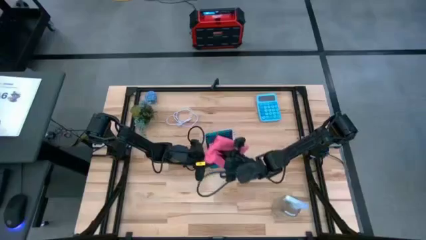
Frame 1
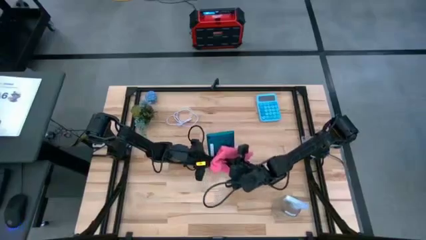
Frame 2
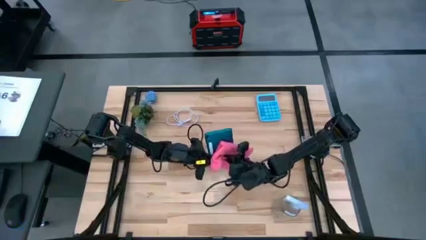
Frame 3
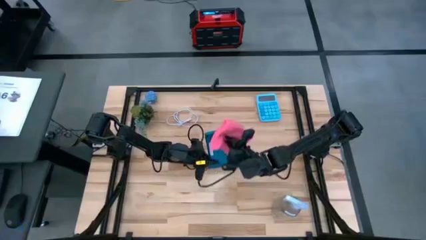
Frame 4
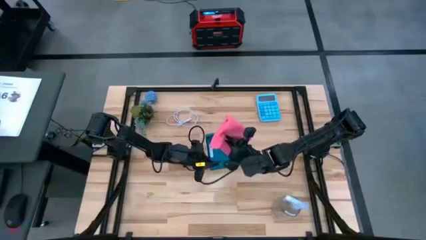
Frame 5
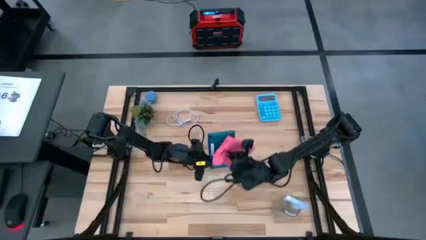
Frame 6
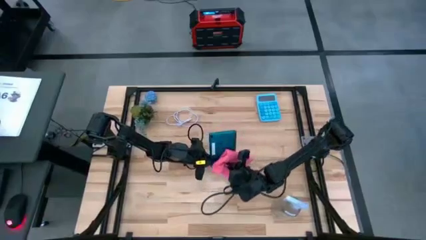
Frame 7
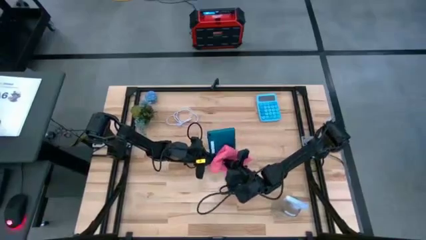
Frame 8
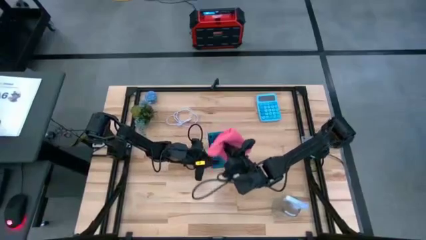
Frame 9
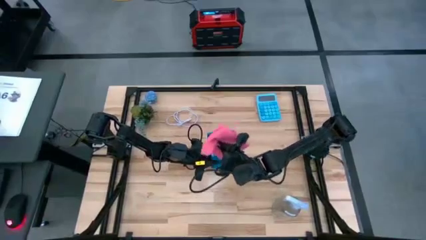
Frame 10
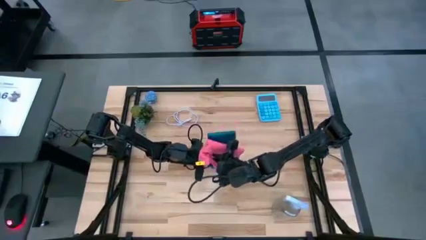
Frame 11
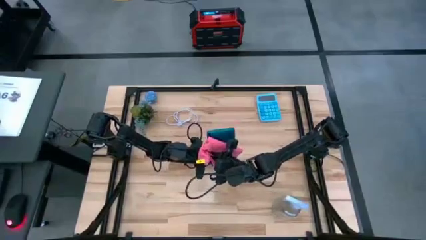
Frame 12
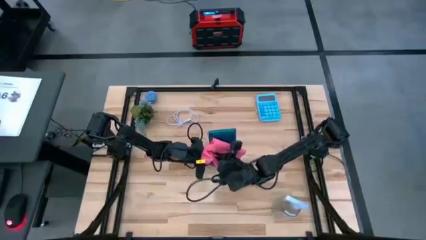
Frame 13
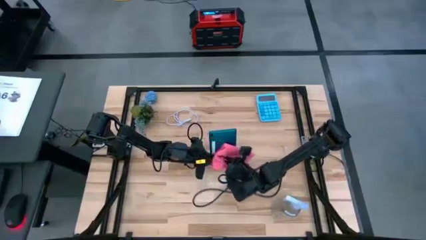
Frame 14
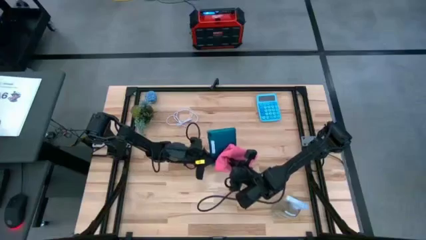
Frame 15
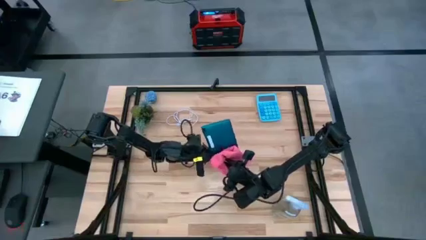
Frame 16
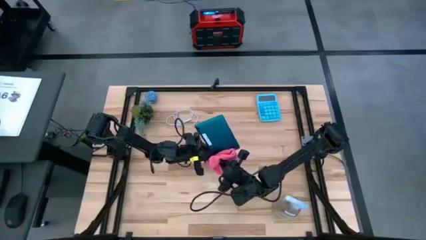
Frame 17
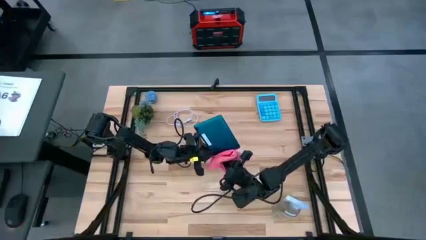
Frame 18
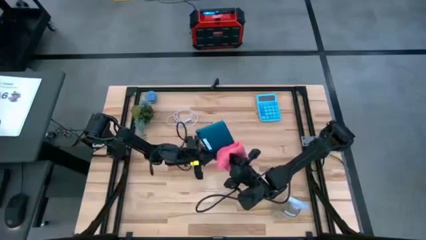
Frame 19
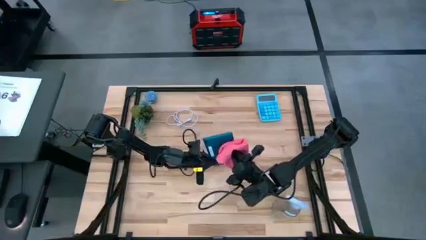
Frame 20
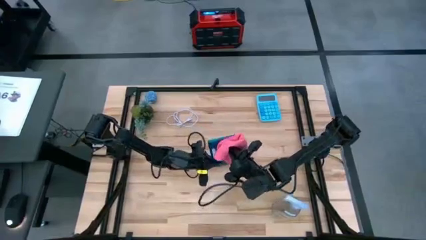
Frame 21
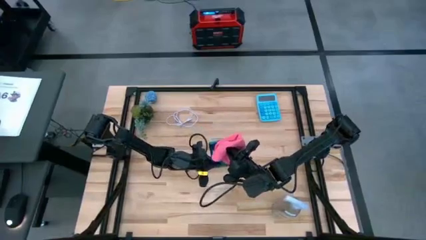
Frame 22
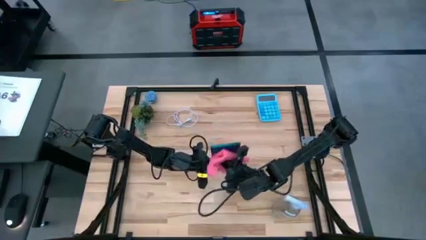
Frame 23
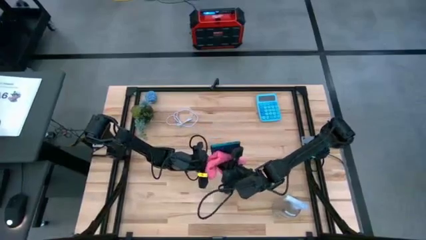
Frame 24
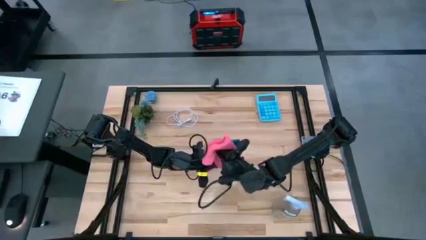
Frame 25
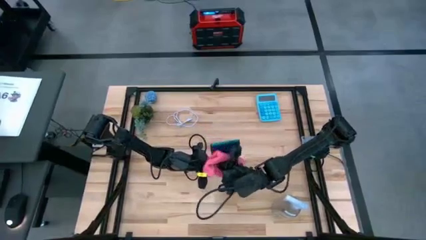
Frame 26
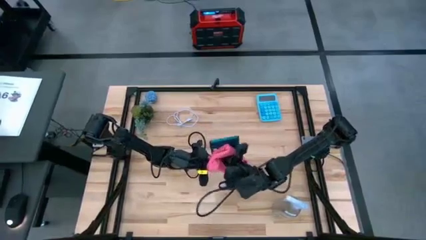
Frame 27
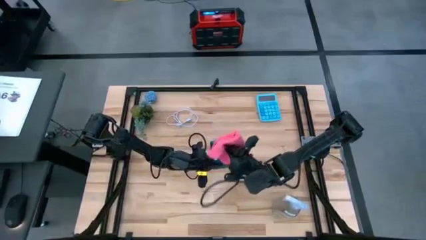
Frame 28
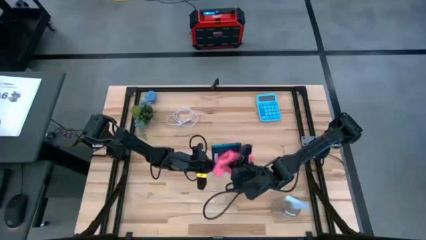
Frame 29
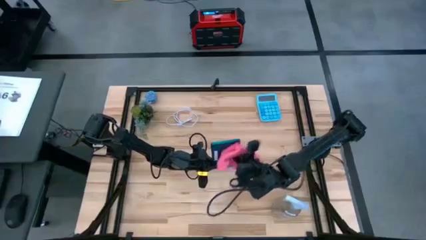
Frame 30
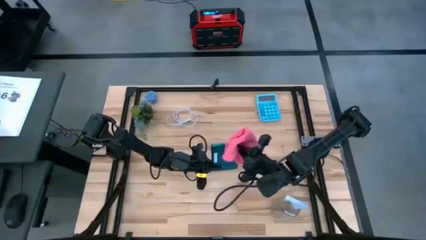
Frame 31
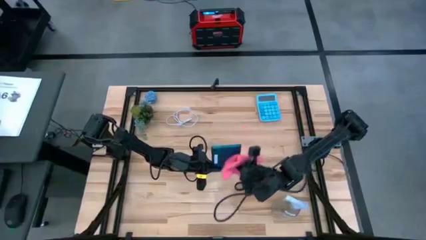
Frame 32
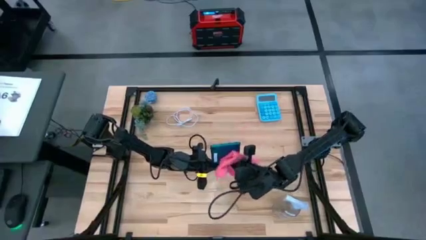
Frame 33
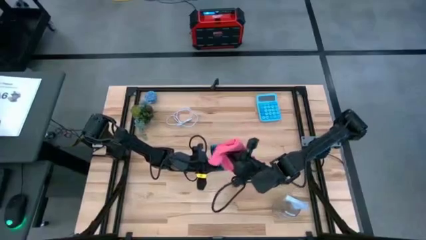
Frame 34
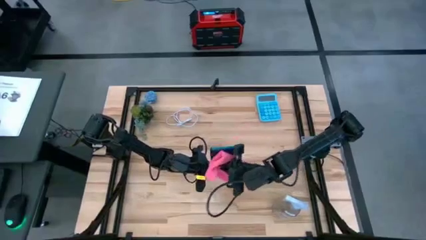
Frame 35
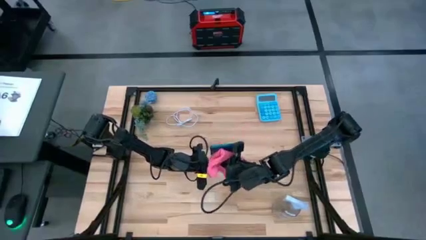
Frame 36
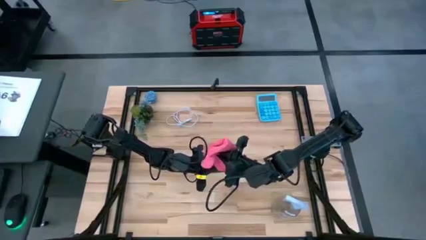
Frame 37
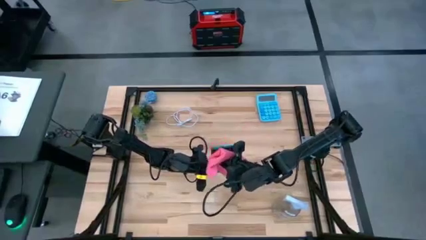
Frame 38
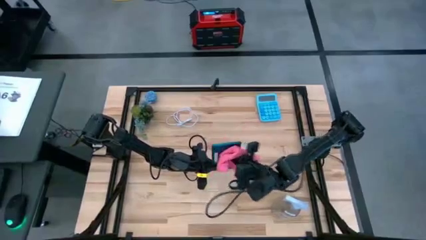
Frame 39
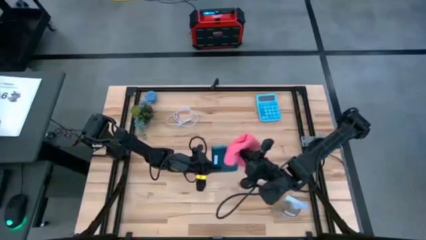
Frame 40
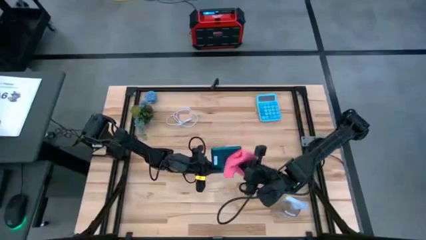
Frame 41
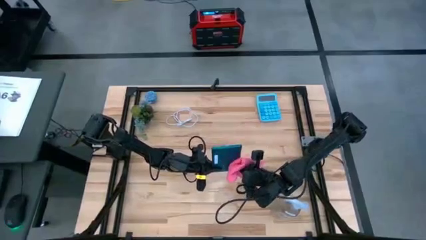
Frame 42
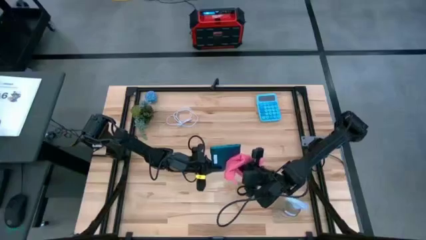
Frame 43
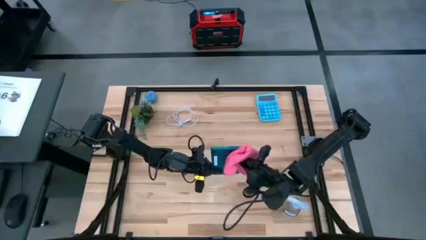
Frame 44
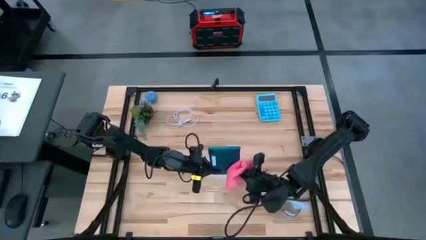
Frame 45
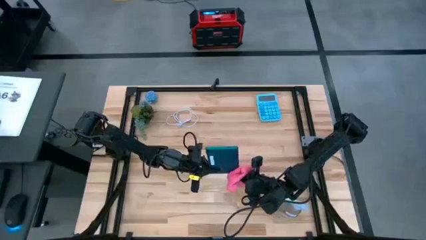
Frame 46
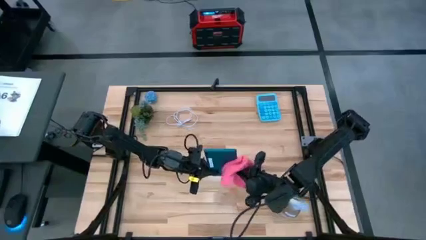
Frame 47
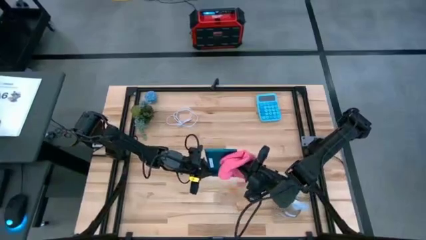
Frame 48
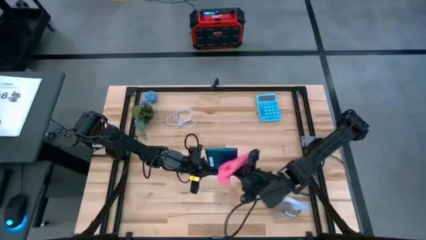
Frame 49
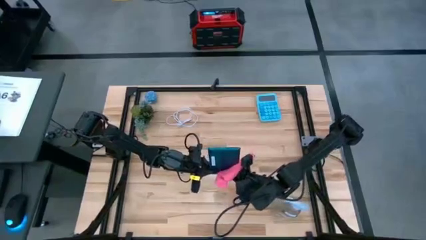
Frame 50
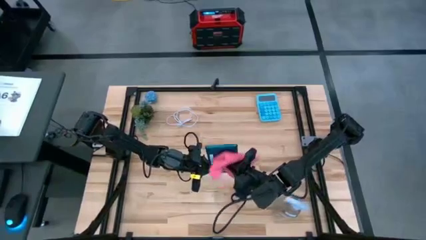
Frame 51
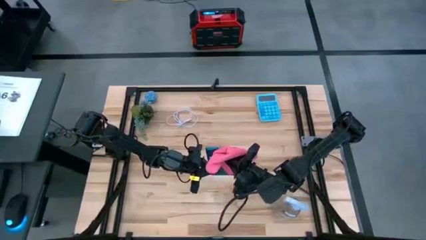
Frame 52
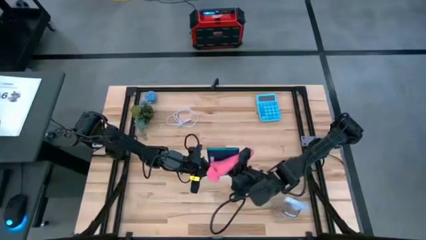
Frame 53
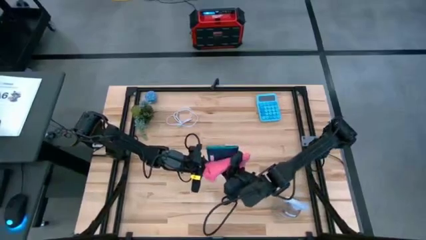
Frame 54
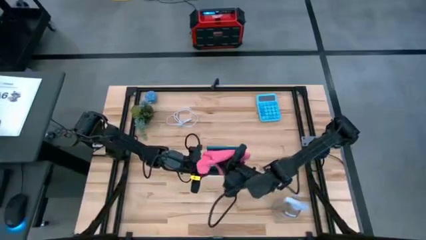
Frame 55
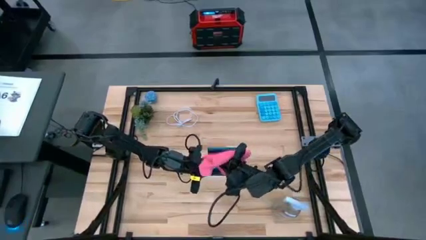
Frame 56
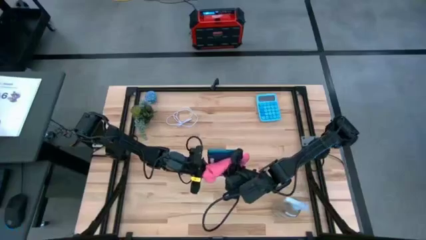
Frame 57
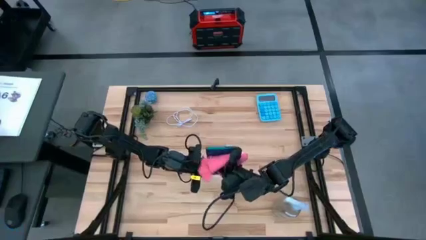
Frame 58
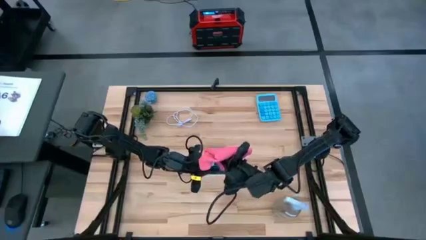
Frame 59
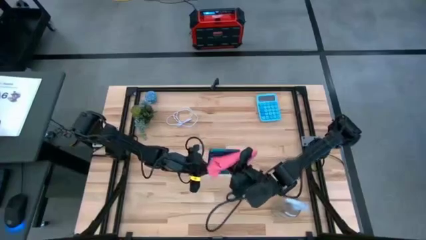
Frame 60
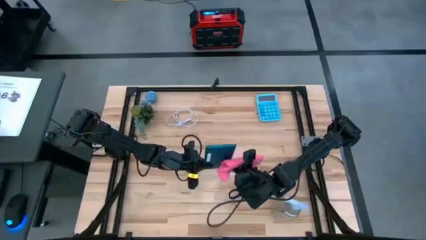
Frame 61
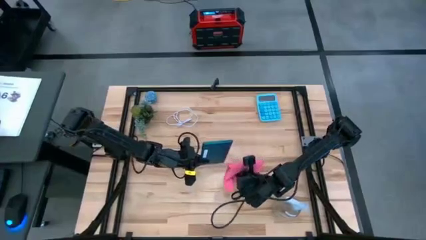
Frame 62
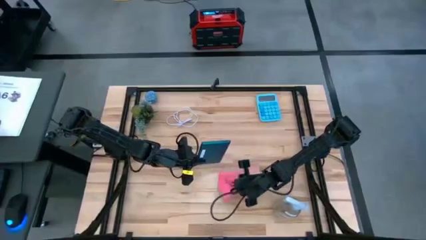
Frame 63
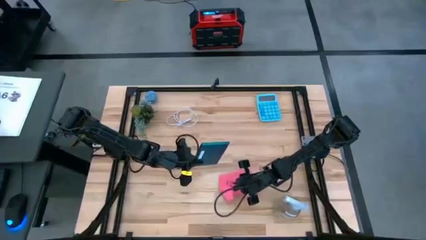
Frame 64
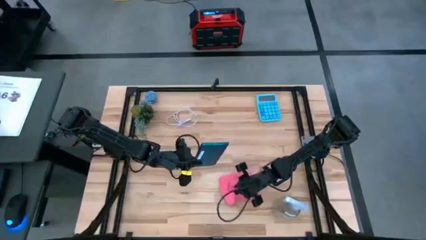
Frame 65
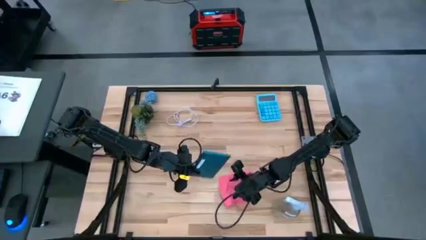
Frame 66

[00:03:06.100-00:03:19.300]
Task: Apply microfiber cloth
Wipe the back of the cellphone with the pink microfiber cloth
